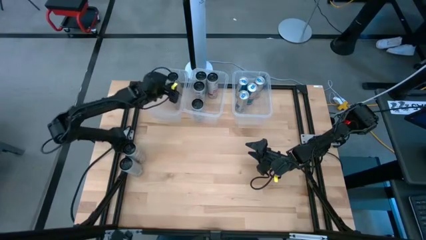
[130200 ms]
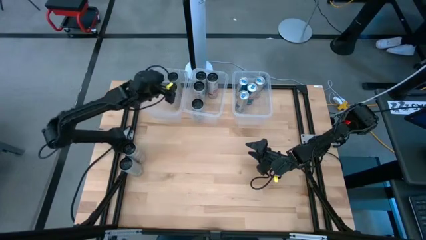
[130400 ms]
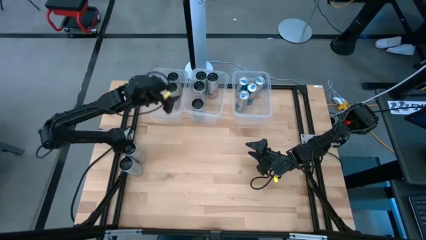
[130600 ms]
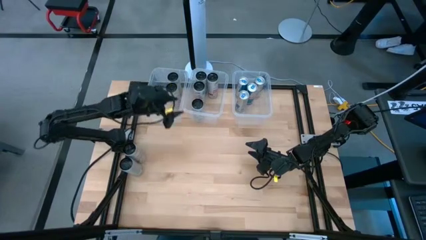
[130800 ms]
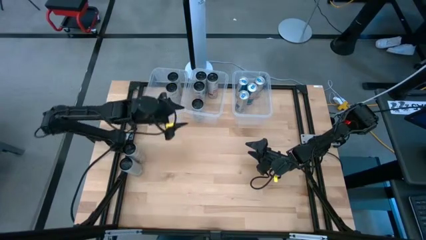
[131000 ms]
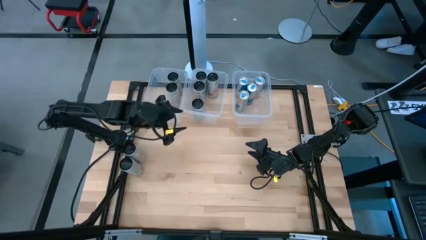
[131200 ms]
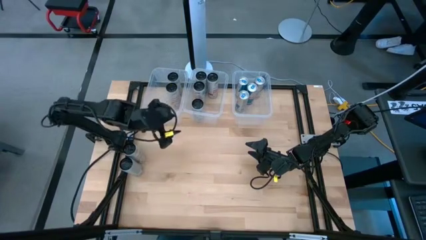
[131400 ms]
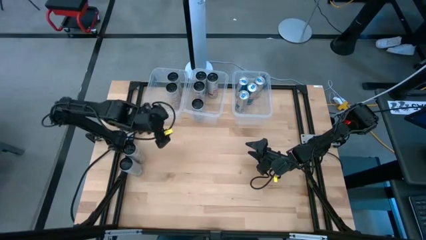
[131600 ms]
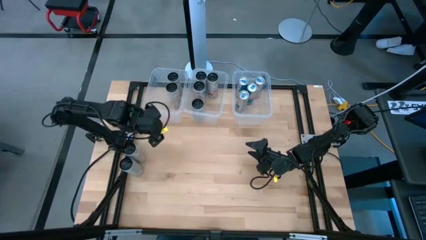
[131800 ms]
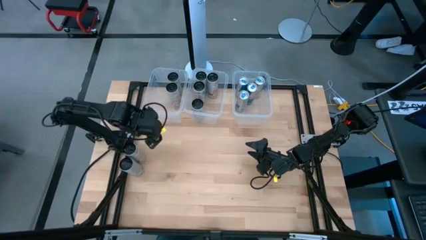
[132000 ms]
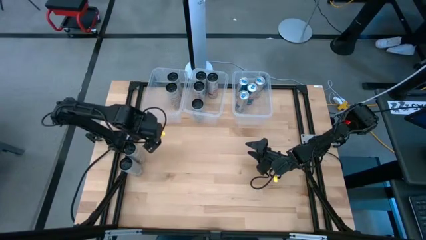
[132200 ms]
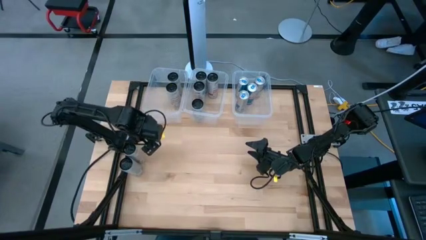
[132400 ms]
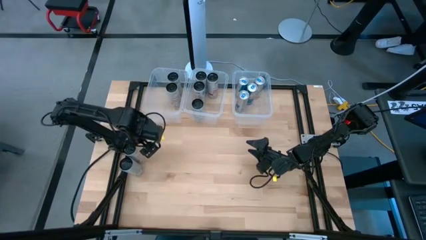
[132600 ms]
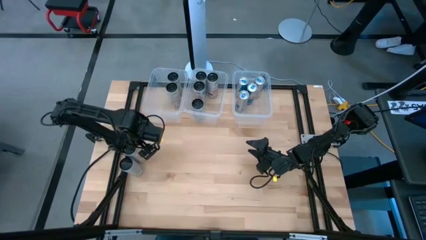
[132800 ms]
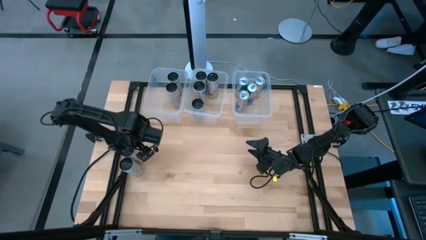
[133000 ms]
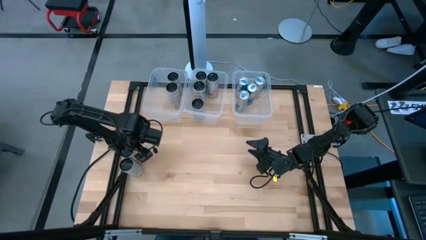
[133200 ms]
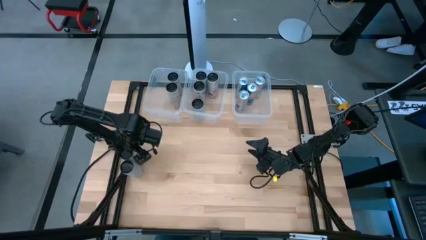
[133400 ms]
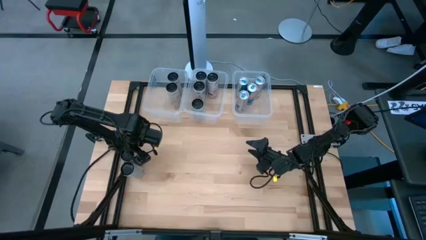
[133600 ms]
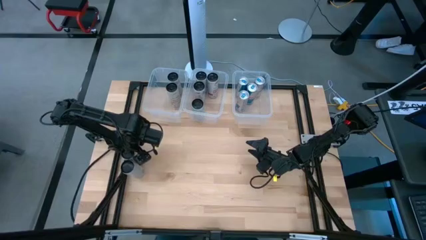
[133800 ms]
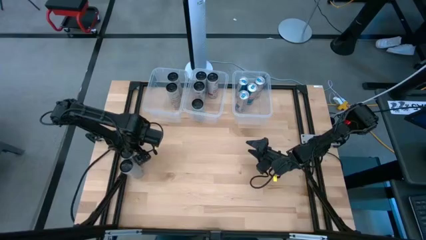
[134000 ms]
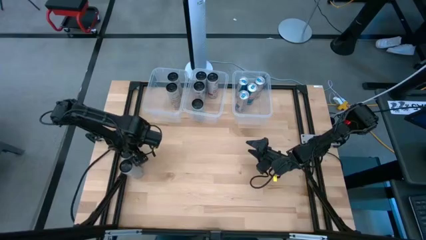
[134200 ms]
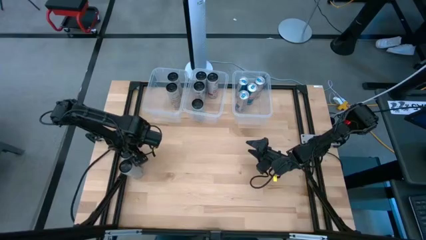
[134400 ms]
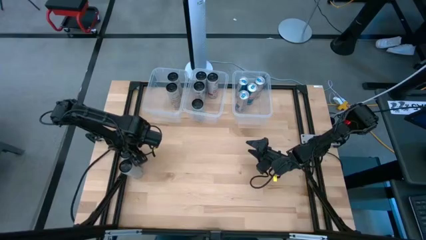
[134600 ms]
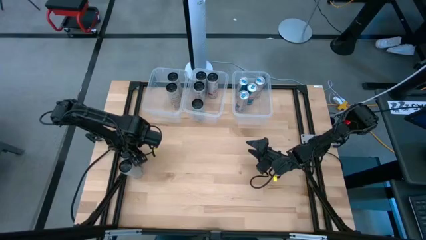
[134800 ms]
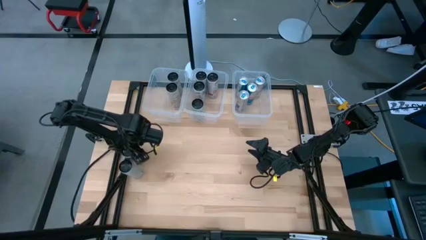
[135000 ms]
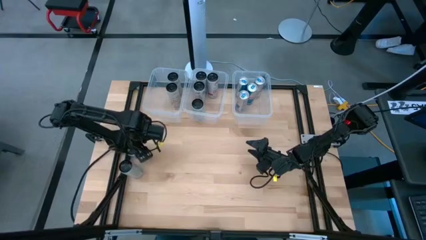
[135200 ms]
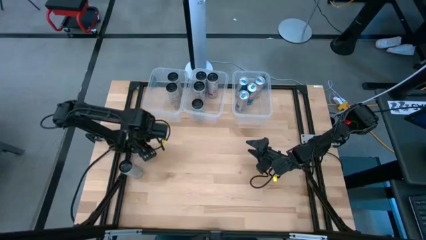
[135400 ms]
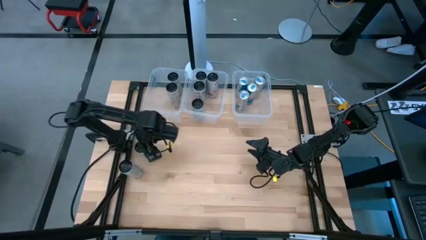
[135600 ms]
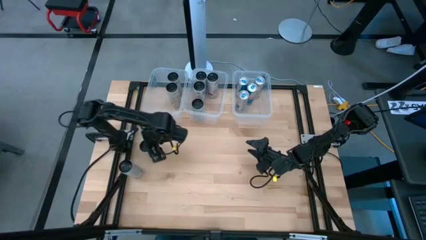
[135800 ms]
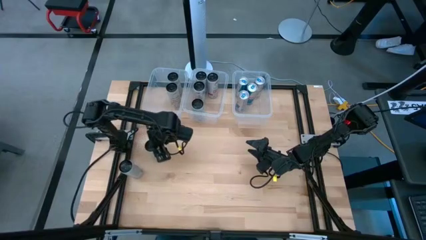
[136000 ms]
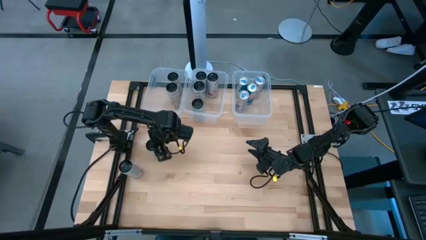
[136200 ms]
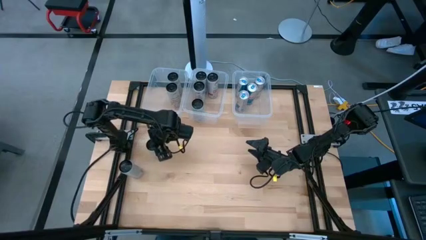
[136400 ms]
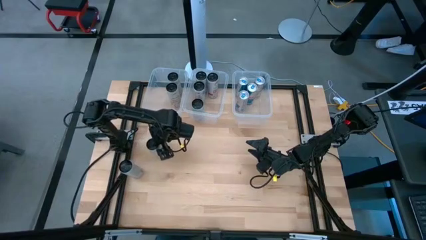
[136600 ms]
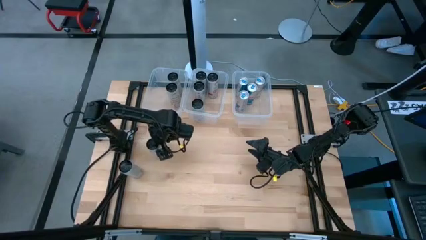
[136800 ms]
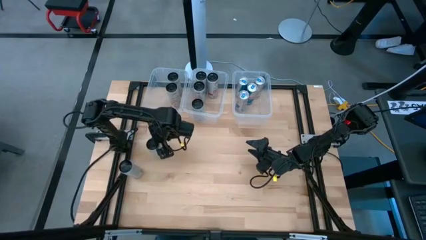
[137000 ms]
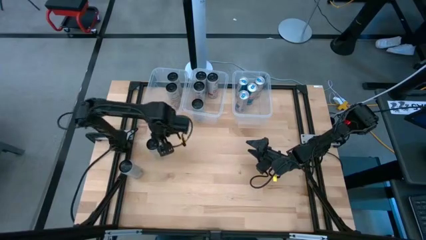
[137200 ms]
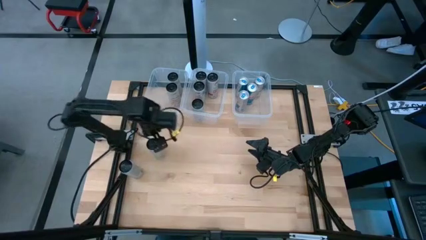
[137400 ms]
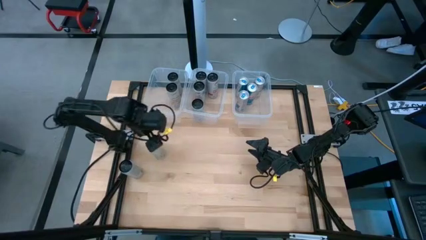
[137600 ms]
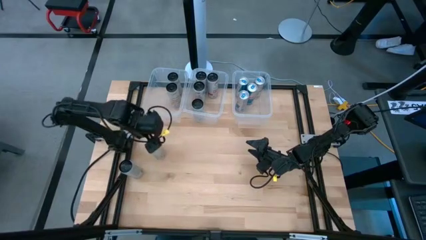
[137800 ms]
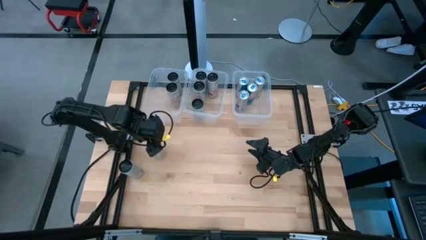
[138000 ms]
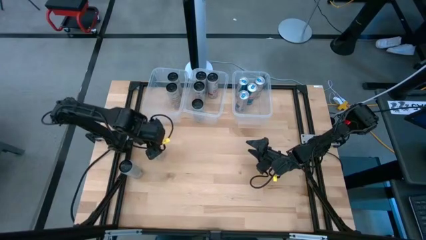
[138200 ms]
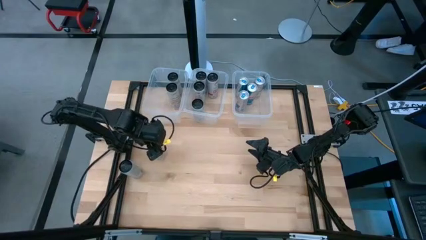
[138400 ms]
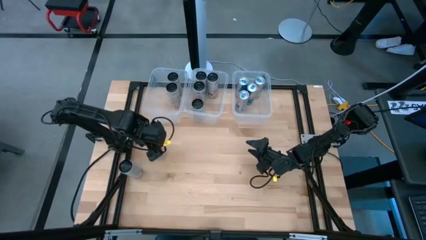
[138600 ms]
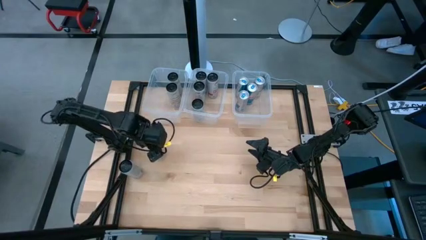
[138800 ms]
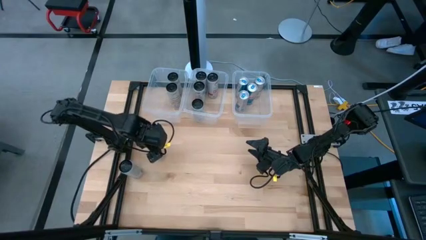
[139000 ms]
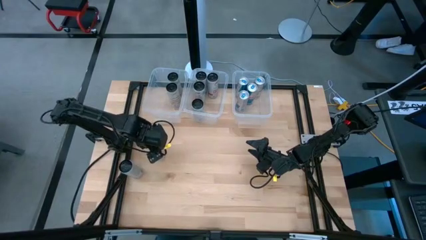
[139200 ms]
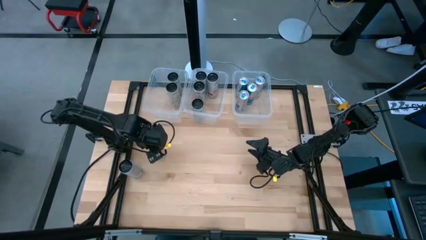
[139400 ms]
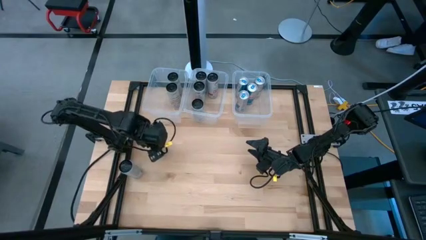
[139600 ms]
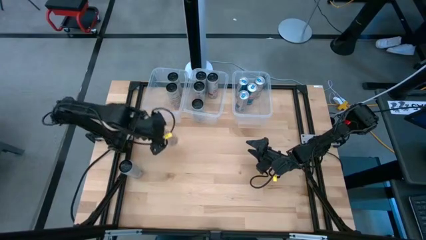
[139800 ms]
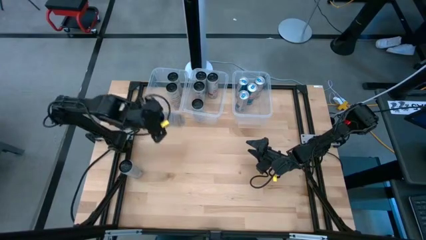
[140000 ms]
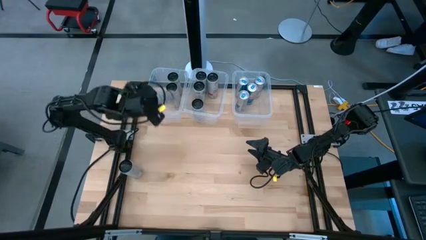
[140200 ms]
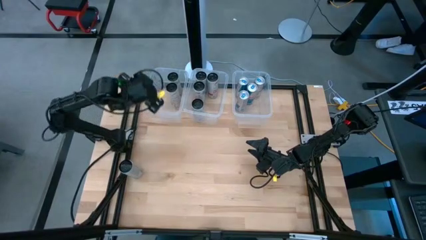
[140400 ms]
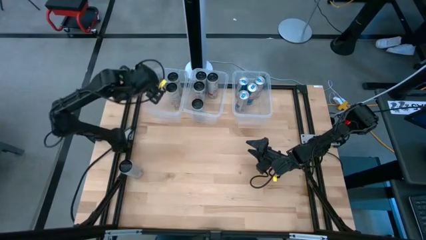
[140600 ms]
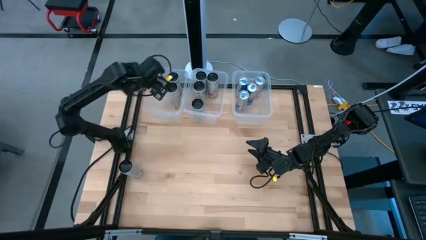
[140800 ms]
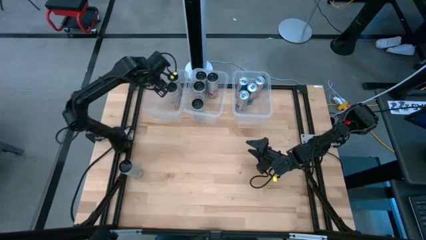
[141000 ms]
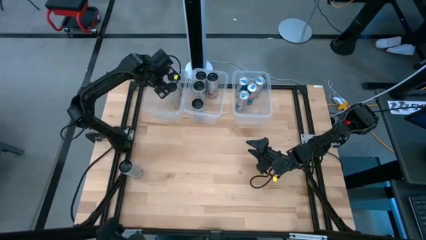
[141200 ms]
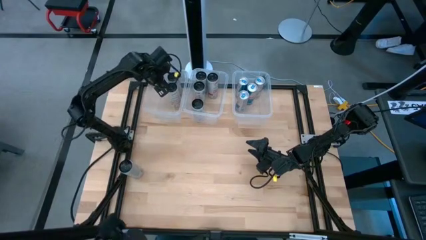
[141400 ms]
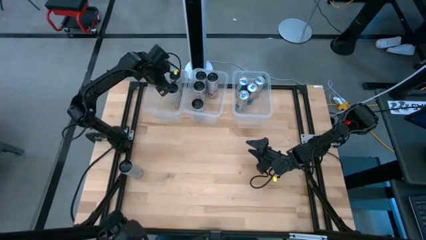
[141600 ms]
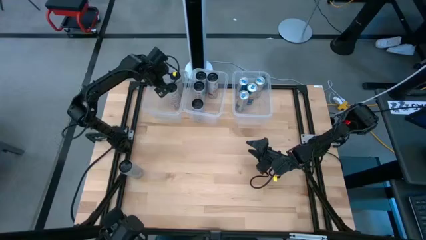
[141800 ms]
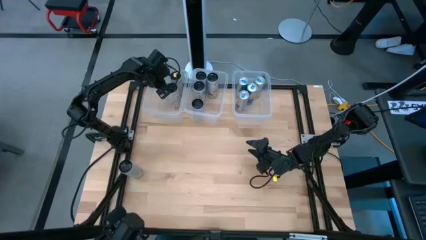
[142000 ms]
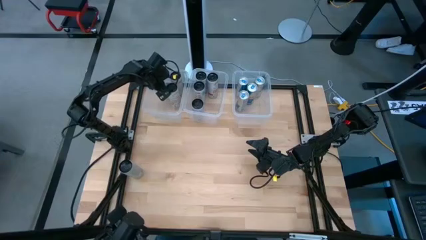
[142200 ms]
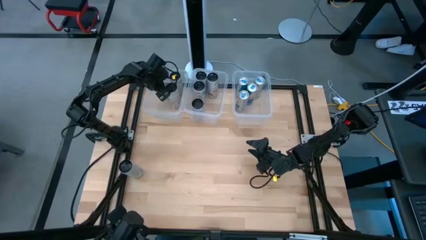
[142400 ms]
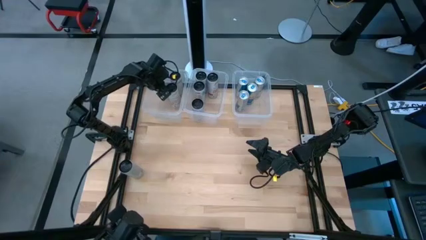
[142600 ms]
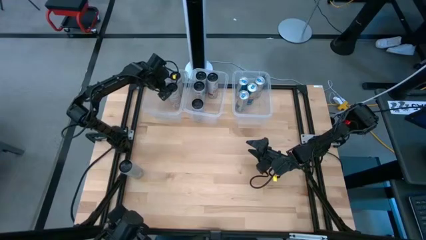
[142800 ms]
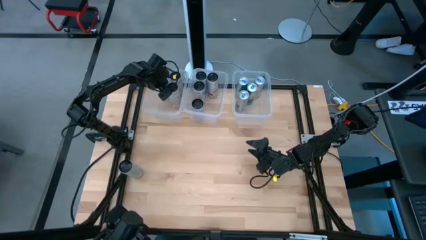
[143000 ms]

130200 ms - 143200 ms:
Task: Sort soda cans
Put the white-yellow soda can into the left transparent bin

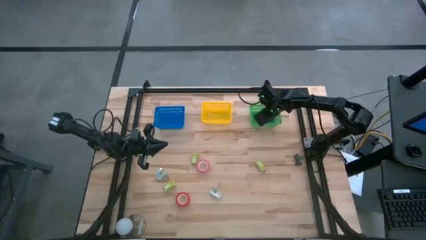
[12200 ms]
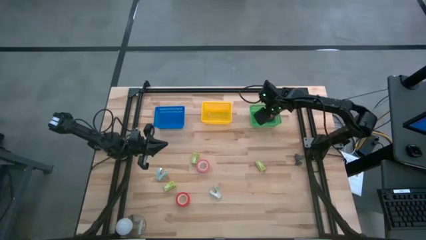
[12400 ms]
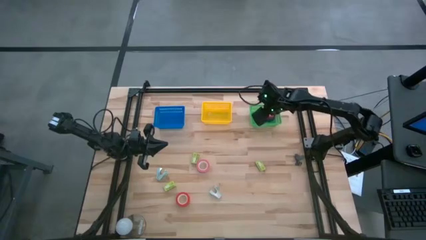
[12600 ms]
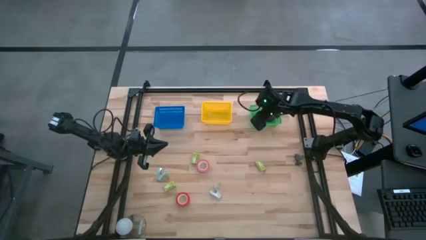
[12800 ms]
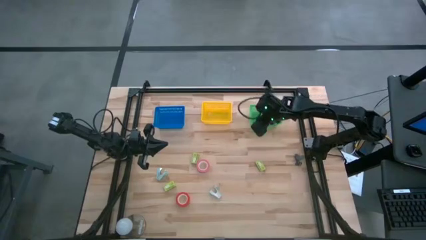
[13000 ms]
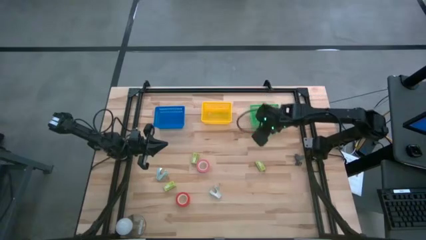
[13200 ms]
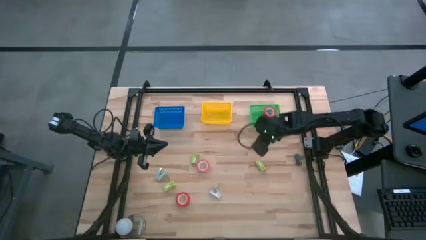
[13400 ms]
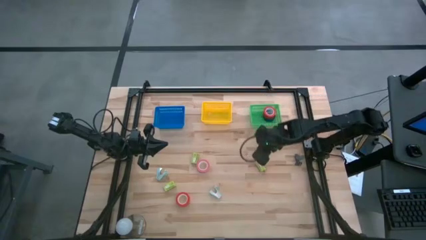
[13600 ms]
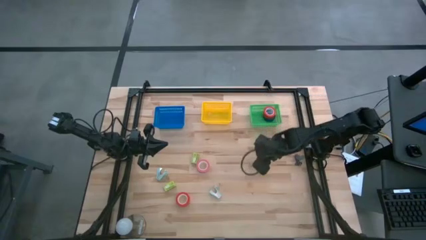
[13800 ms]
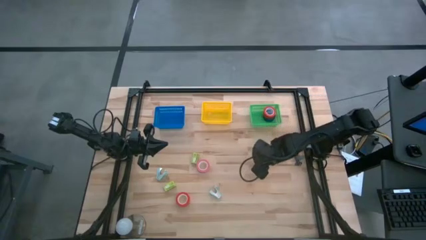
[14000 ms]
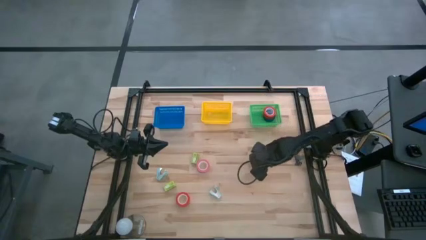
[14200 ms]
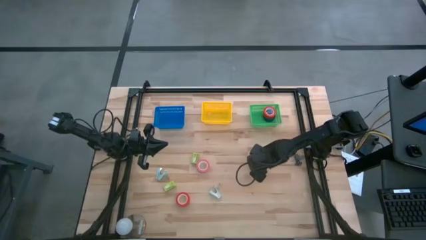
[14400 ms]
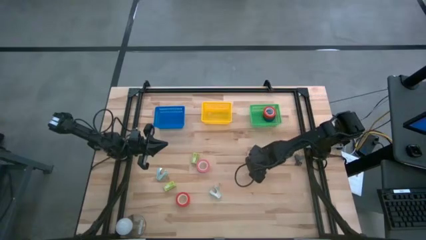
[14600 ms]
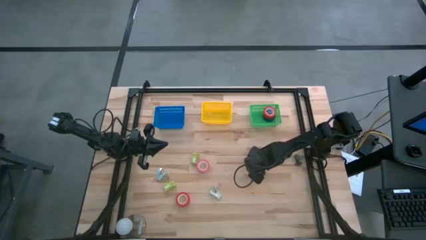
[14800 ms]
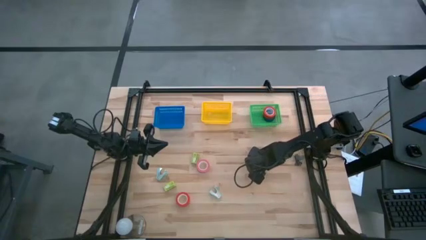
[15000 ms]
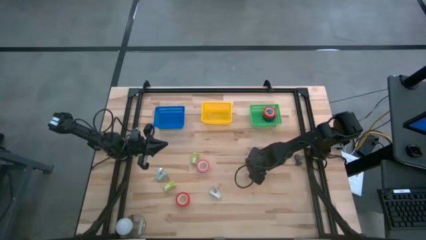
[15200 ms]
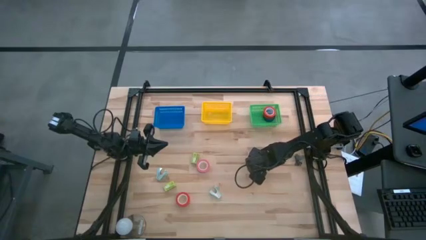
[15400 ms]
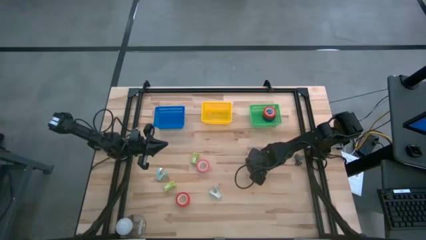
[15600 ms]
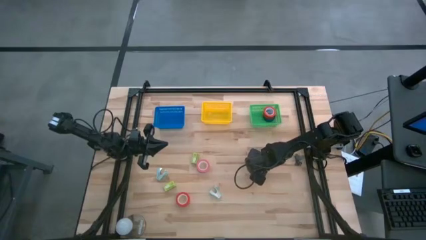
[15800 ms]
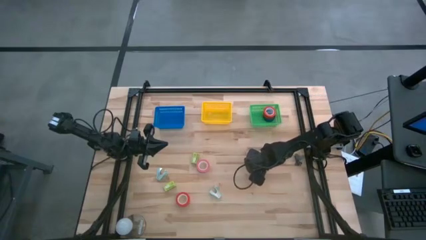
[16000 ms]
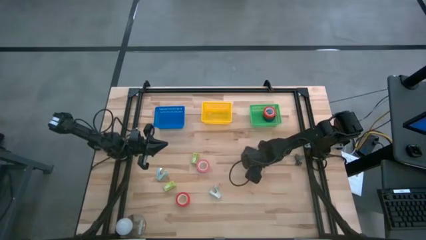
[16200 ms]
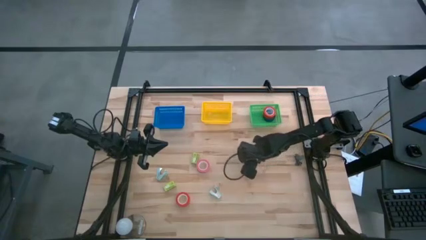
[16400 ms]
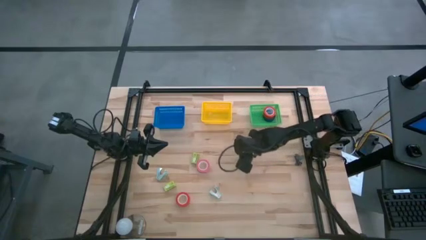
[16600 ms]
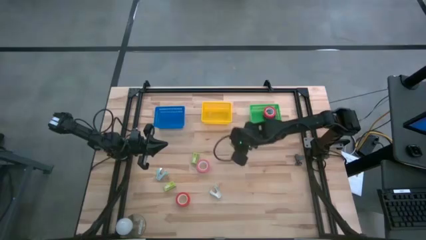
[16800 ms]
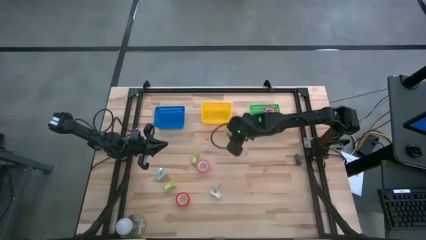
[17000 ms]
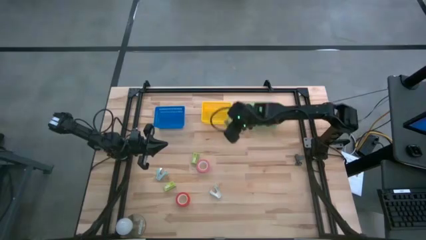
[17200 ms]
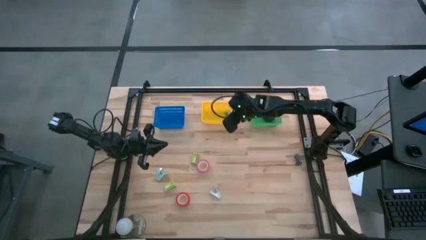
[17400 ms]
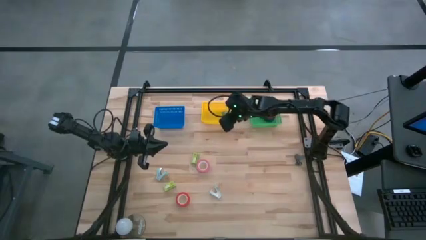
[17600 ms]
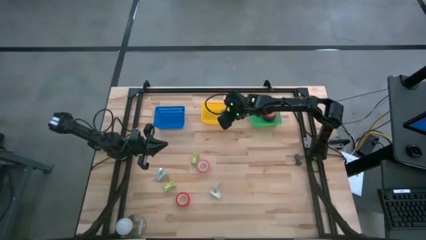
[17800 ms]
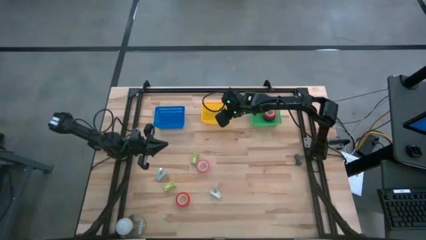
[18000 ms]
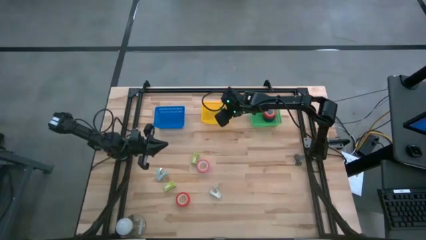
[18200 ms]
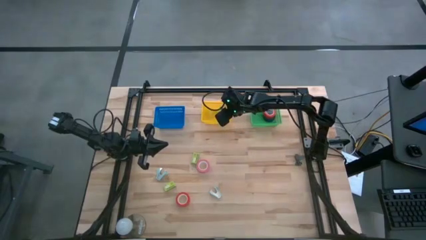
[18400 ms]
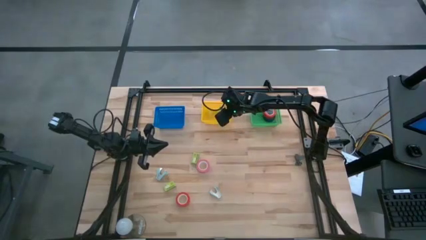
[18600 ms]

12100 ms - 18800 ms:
Task: Pick and place Stapler, Stapler remover, tape
Put the middle green staple box into the yellow basket
